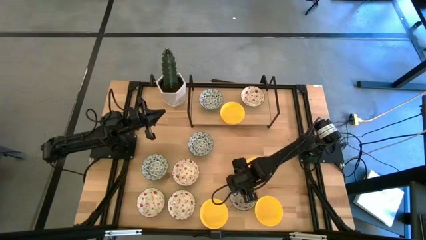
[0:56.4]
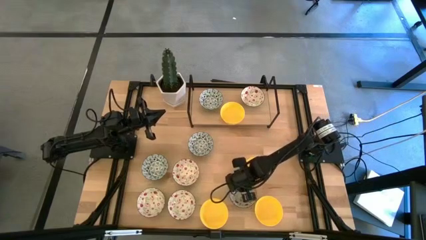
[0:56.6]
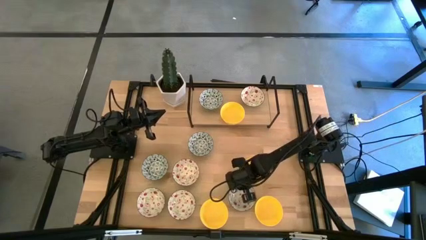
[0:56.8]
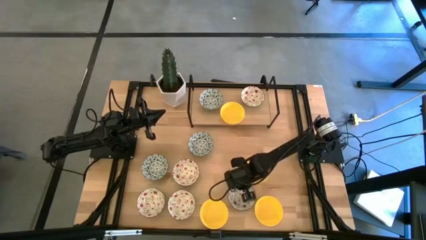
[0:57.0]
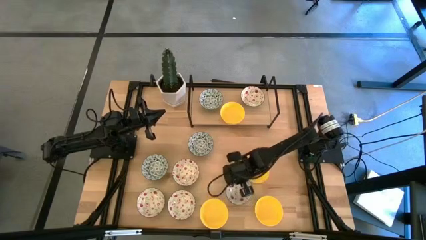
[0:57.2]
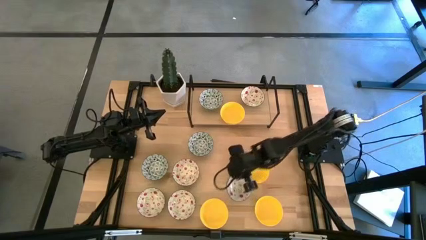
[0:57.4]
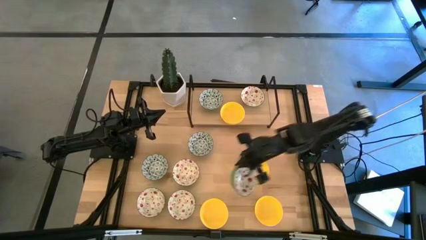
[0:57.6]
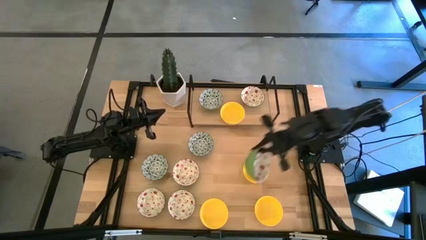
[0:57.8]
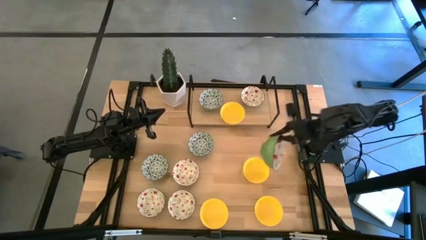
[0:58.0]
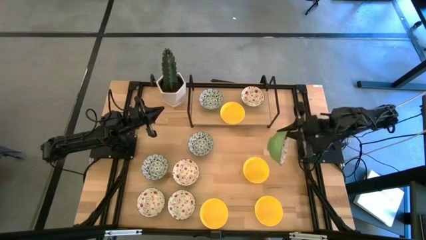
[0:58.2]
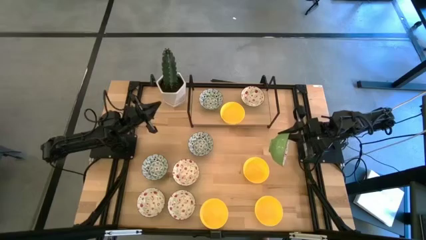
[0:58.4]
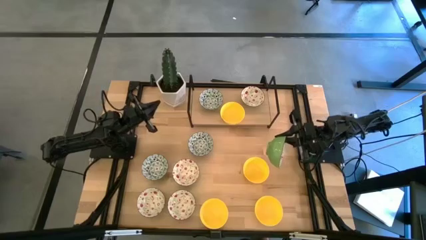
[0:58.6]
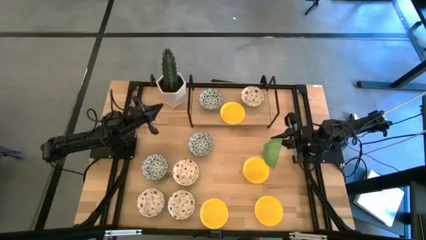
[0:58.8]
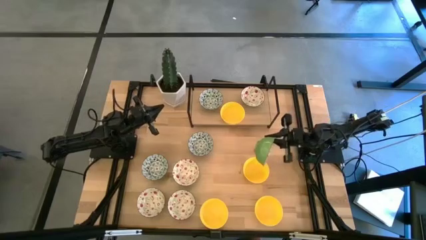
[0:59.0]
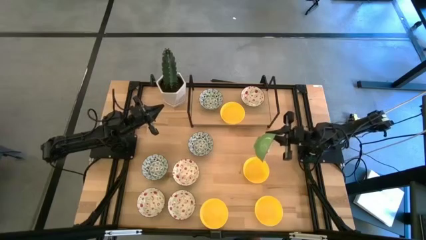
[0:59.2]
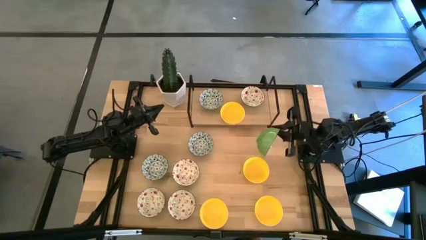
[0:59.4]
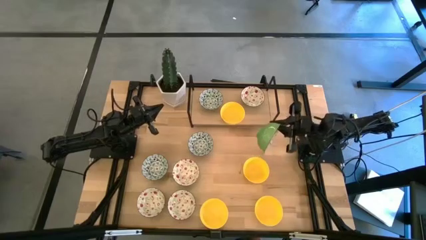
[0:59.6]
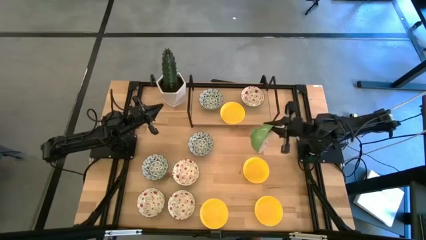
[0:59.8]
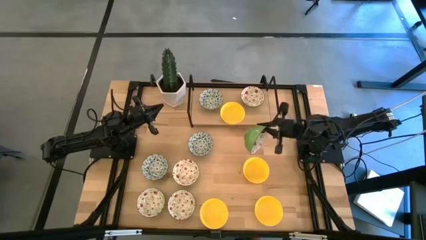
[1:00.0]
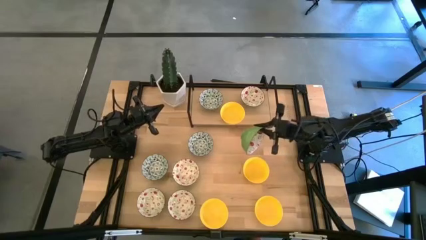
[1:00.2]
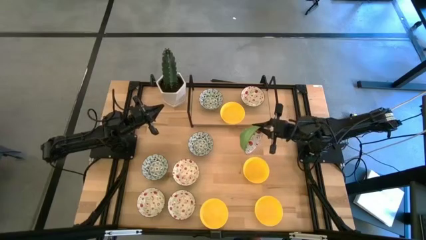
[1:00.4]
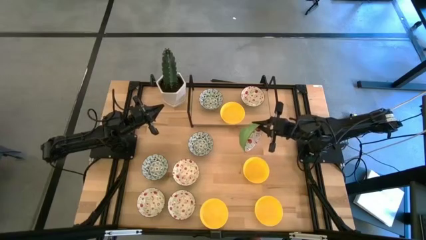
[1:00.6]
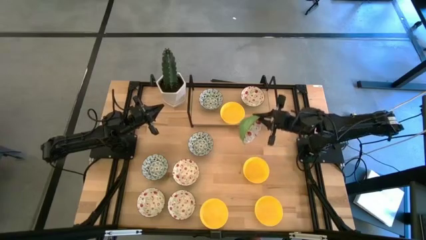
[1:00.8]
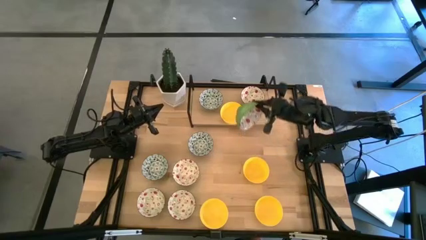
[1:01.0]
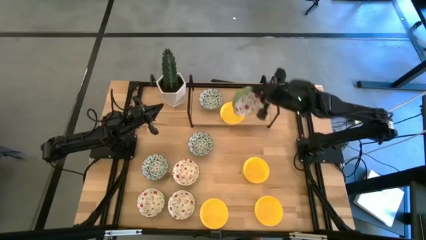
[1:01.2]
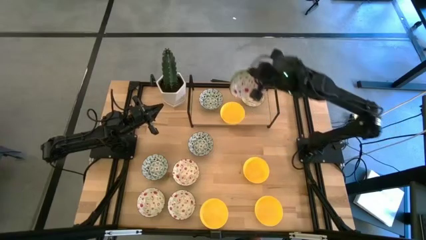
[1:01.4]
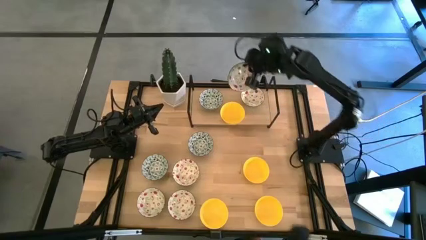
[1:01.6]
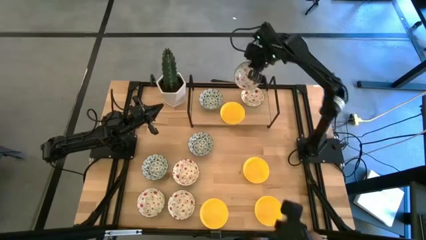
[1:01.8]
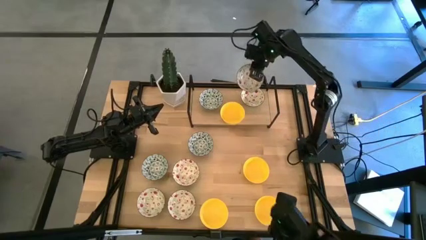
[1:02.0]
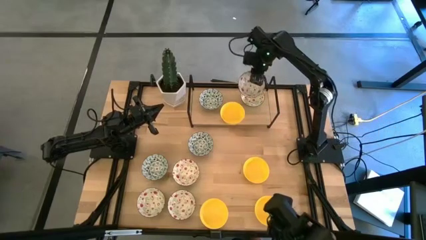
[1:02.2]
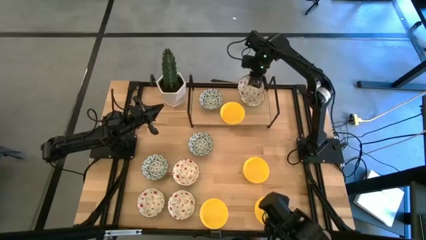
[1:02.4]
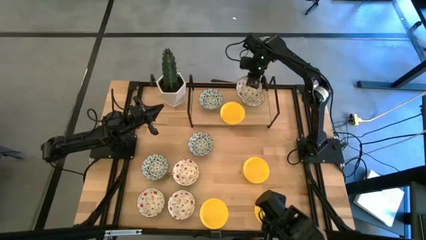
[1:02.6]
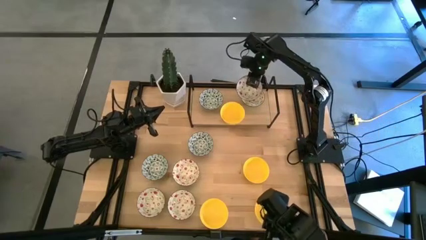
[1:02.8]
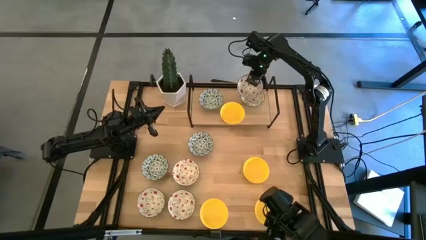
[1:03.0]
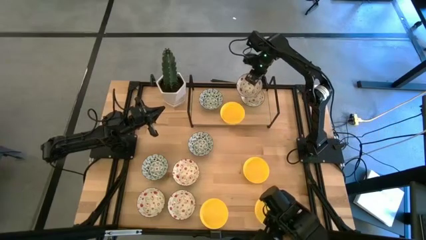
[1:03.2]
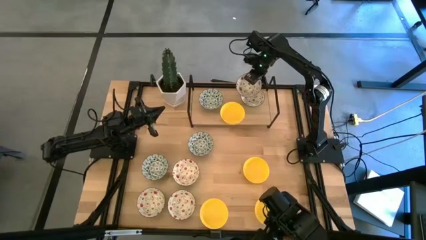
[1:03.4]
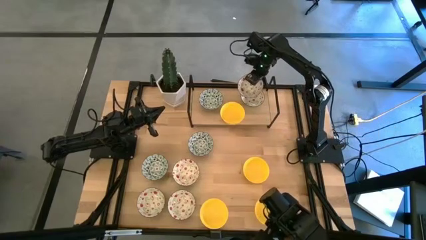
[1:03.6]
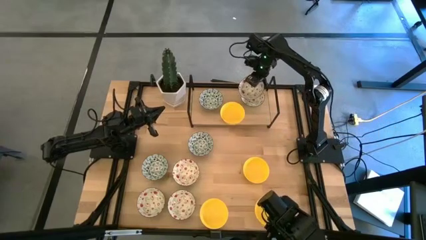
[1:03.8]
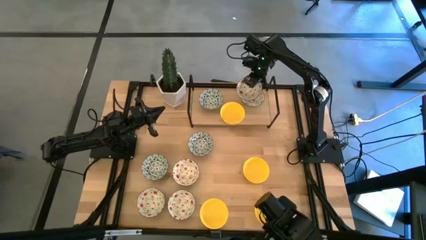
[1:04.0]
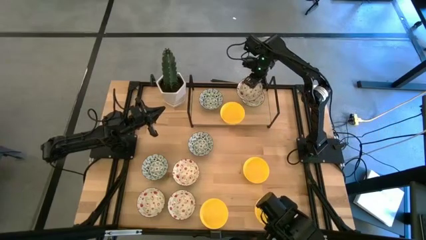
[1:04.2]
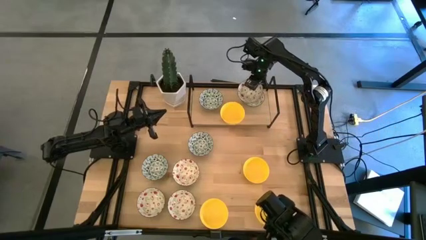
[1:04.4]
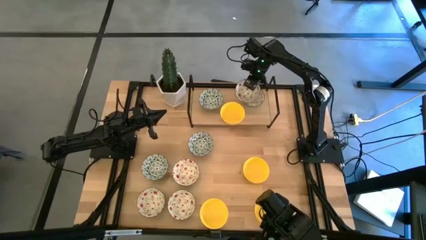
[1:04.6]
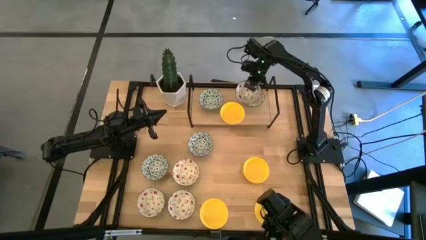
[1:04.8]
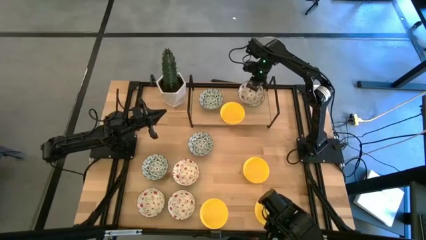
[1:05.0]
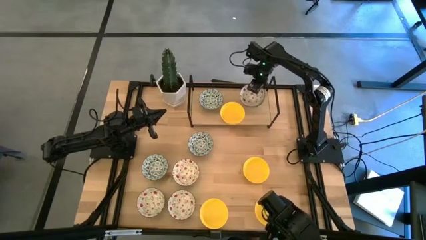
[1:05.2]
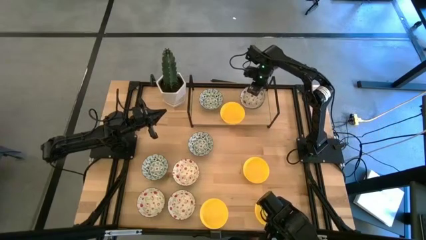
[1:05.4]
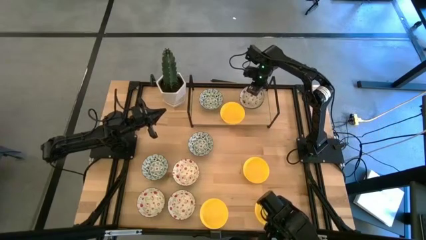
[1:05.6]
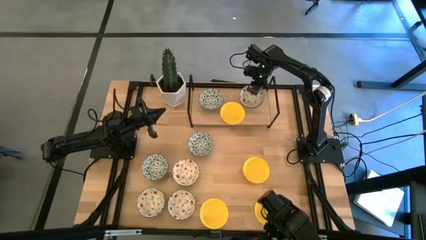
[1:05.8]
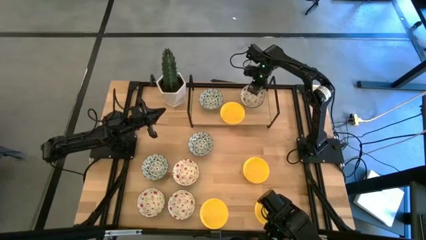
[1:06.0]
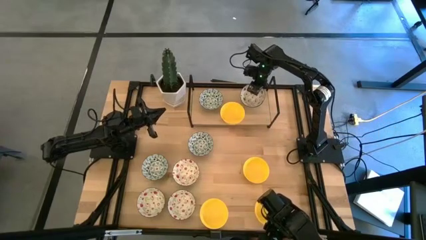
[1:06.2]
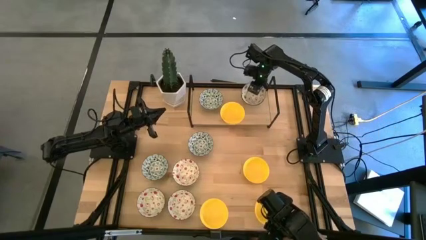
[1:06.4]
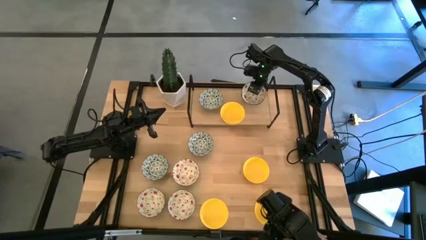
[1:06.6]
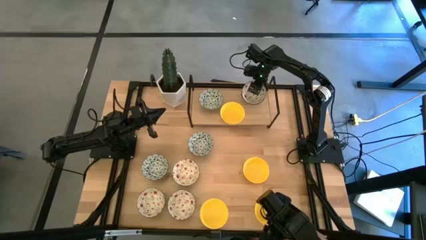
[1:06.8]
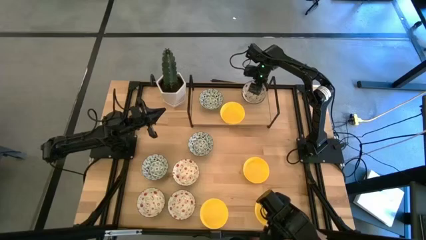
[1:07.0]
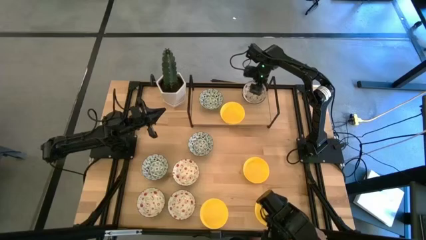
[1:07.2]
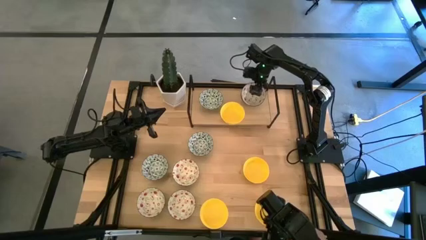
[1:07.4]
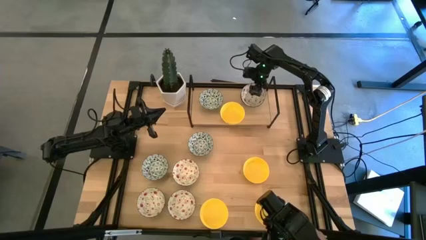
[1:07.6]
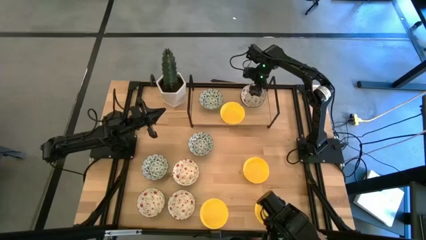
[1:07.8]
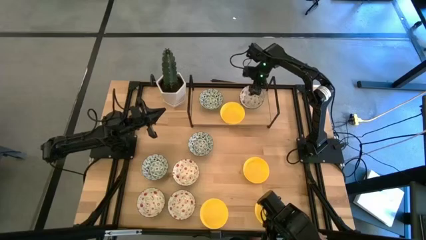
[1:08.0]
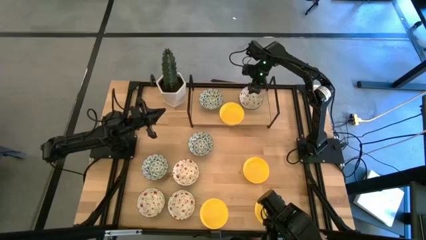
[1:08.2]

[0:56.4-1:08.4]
Task: Pick & Place Mini bowls
Stack the green printed bowl on top of the green printed bowl on the shelf

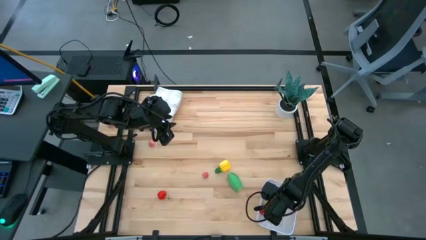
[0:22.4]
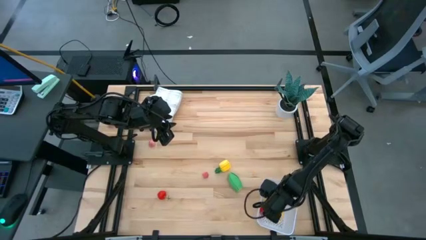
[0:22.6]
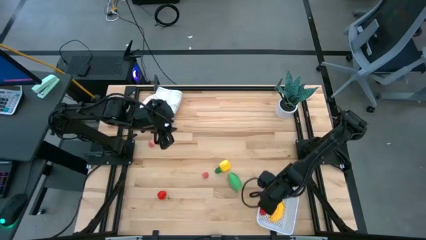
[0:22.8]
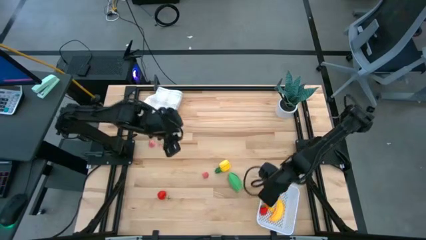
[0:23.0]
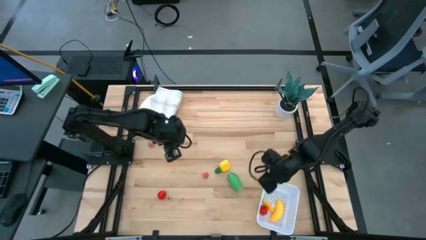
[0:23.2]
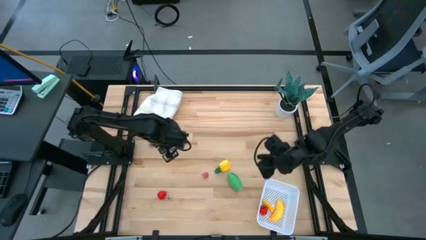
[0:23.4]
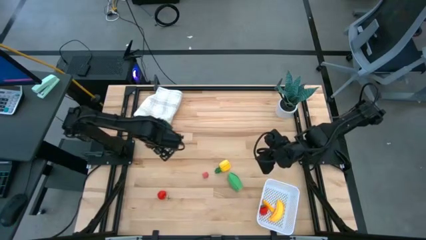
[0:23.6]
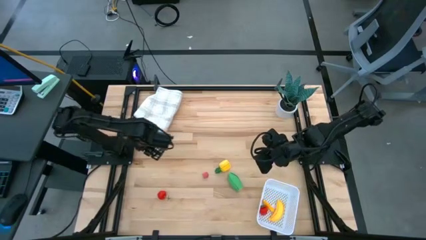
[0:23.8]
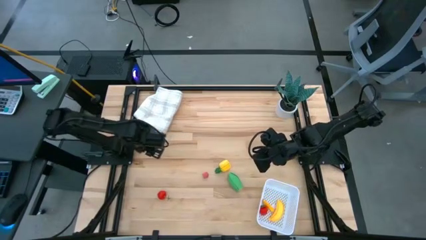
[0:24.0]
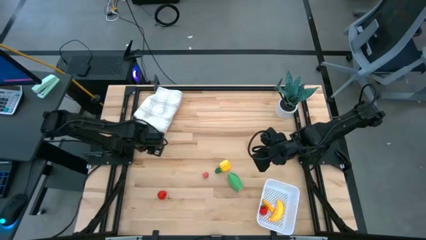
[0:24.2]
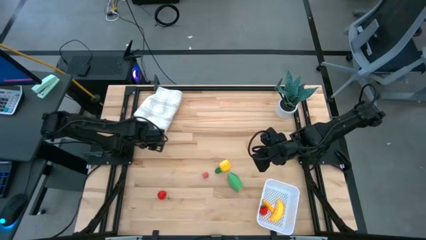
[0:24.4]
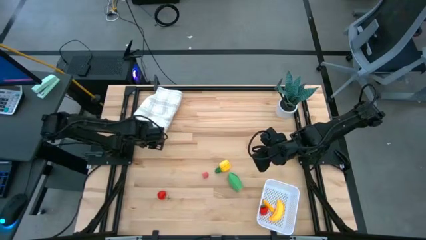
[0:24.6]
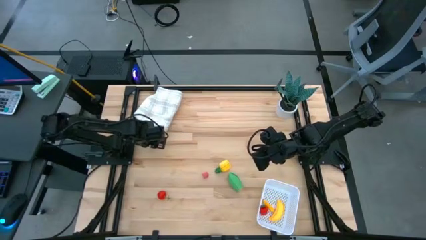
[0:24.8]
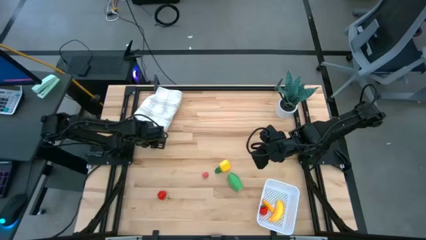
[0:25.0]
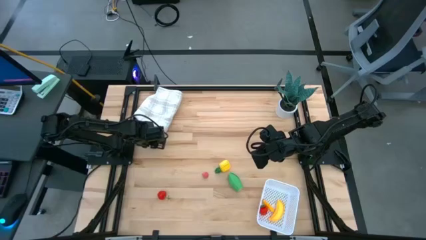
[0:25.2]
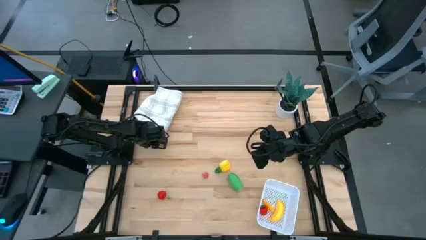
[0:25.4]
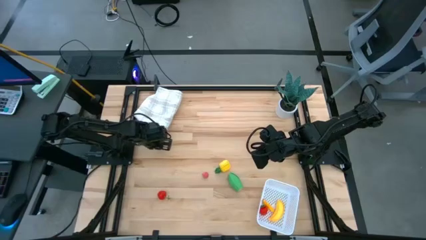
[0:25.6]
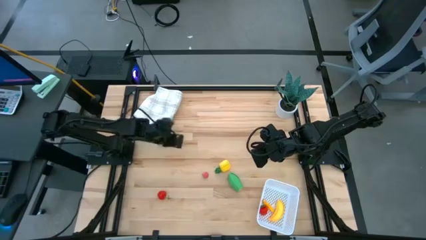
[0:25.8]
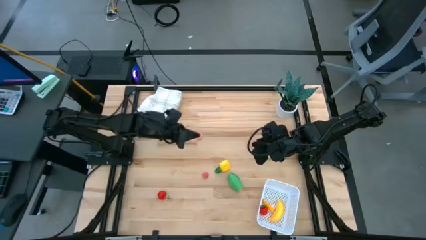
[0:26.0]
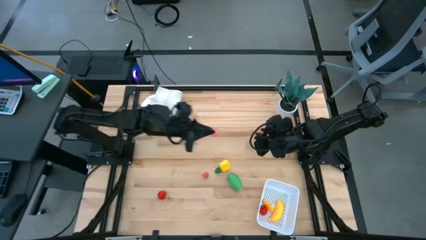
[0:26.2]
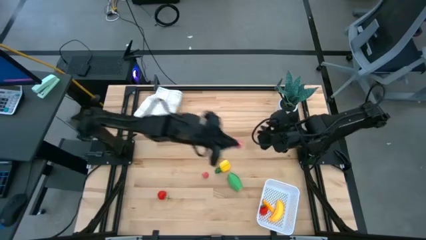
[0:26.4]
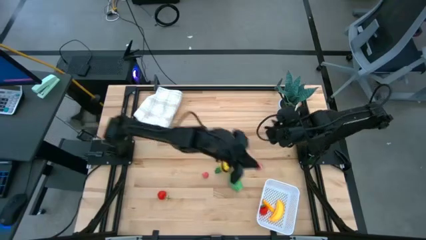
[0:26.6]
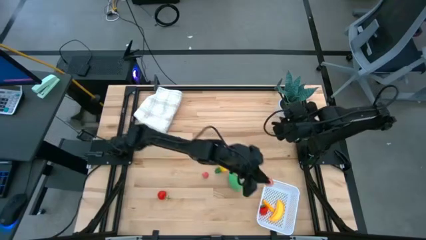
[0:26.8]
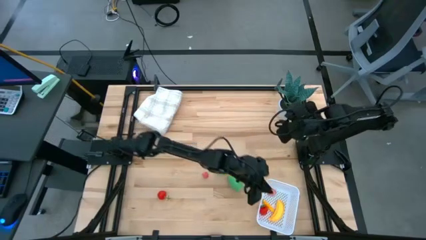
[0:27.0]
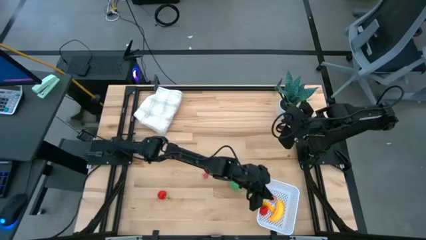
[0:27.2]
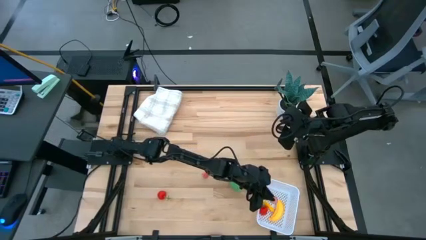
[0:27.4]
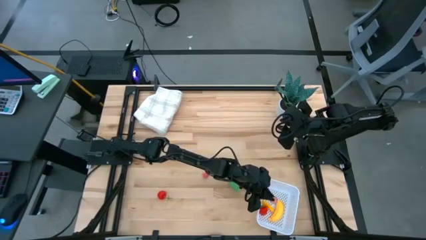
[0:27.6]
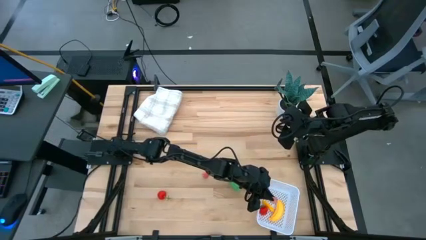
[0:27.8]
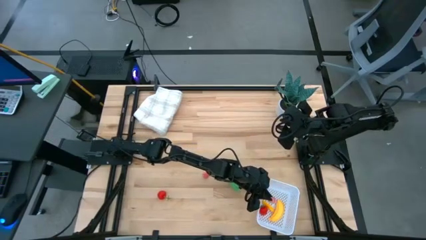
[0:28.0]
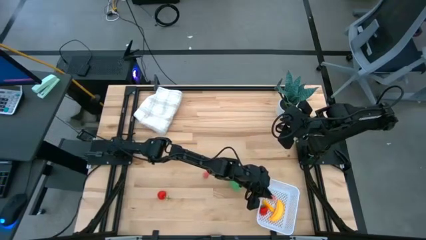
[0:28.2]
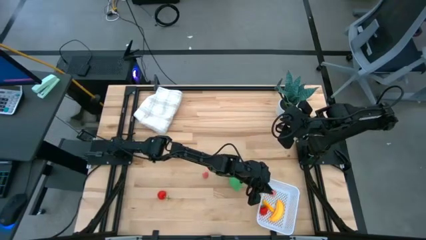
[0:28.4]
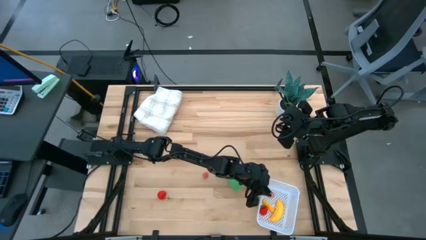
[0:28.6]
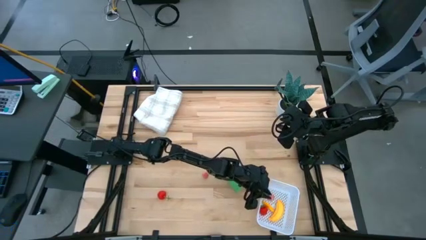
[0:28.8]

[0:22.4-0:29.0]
Task: Pick and placing Produce into tupperware
Put the top pink peach into the white basket
